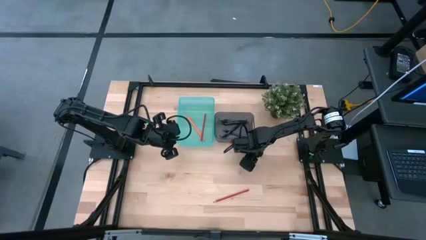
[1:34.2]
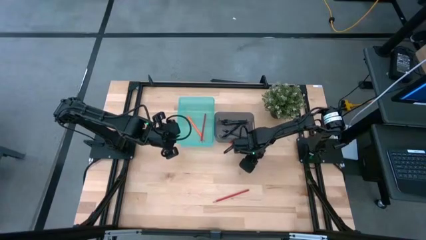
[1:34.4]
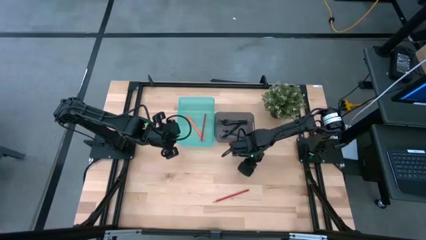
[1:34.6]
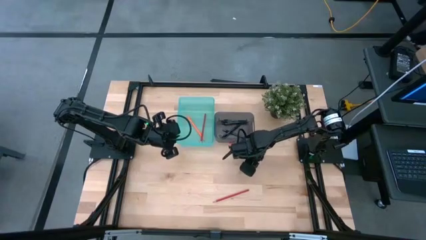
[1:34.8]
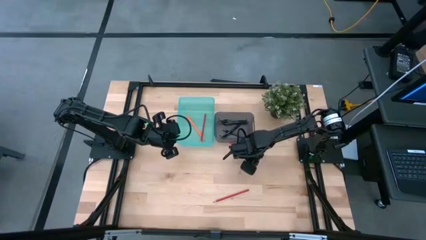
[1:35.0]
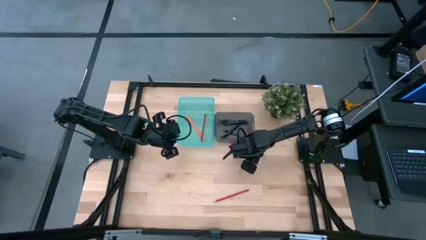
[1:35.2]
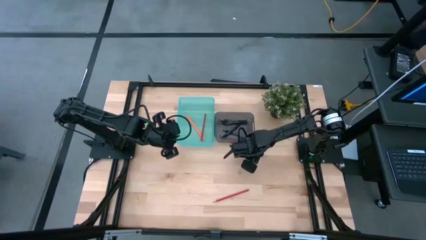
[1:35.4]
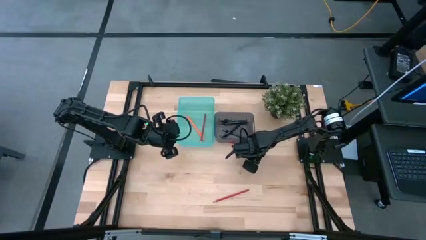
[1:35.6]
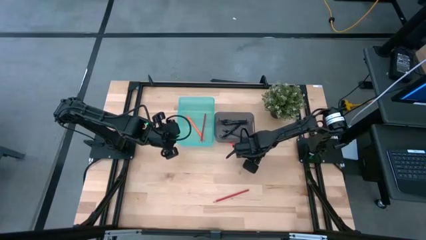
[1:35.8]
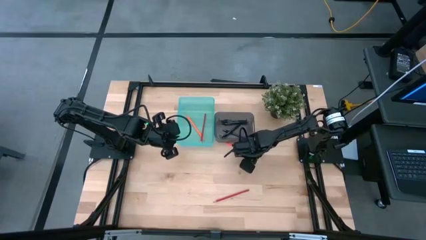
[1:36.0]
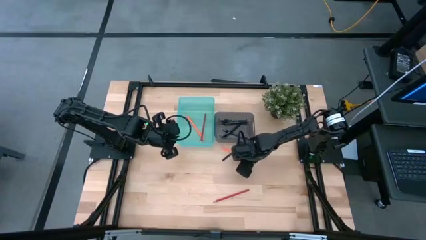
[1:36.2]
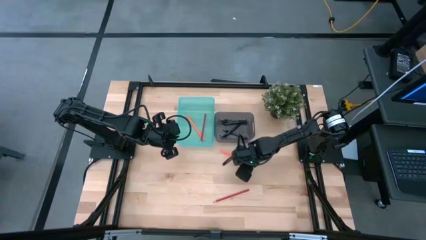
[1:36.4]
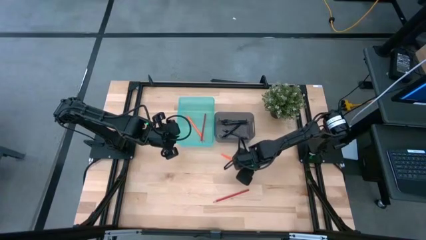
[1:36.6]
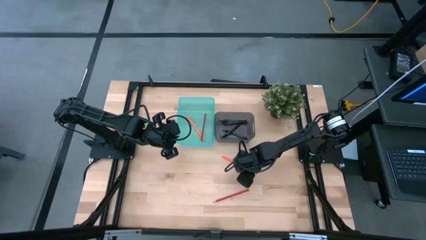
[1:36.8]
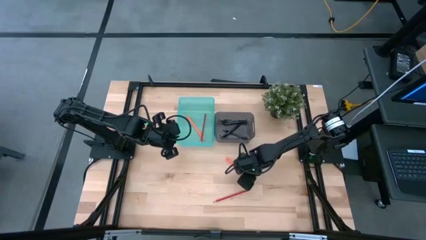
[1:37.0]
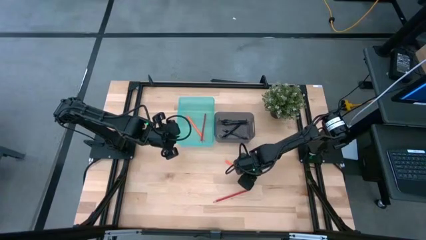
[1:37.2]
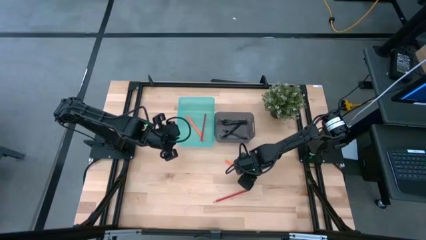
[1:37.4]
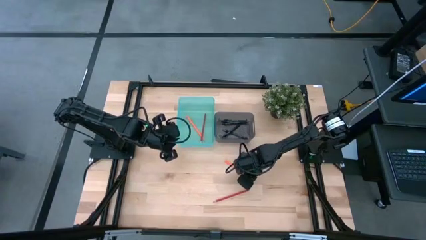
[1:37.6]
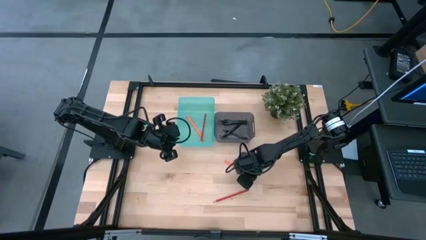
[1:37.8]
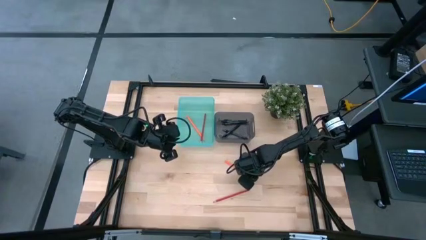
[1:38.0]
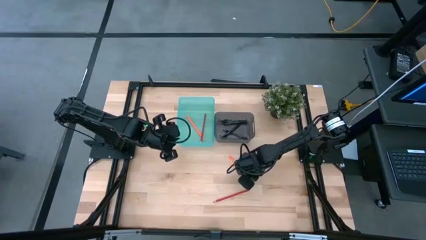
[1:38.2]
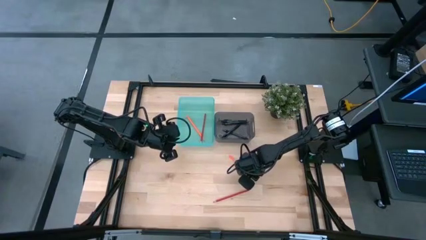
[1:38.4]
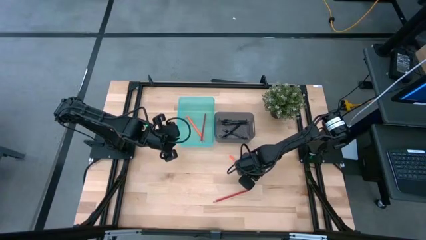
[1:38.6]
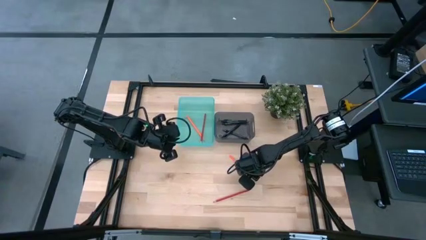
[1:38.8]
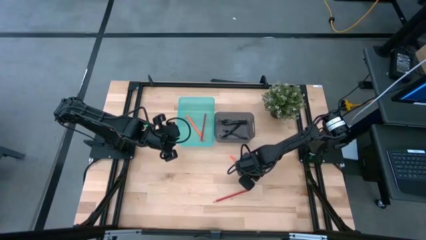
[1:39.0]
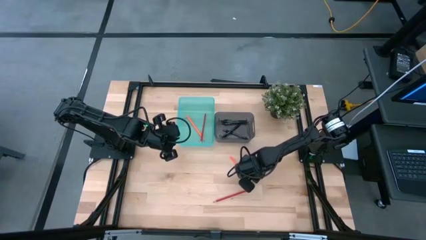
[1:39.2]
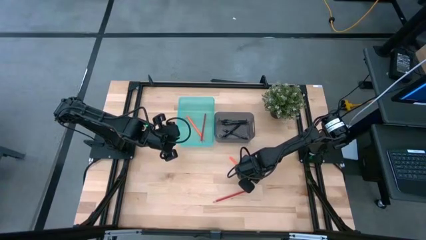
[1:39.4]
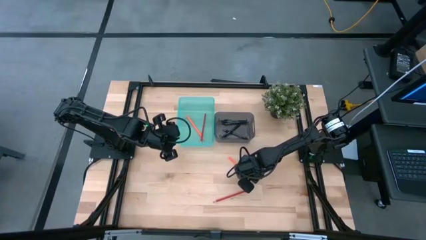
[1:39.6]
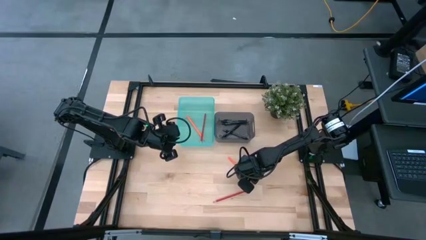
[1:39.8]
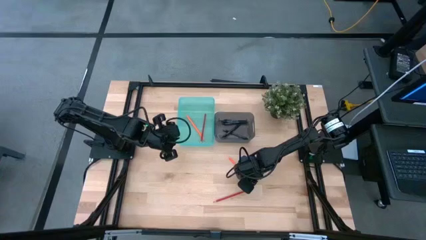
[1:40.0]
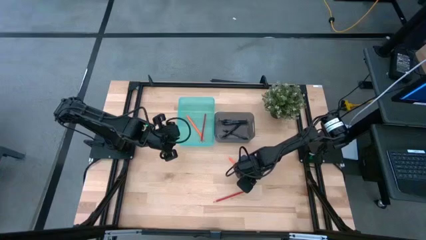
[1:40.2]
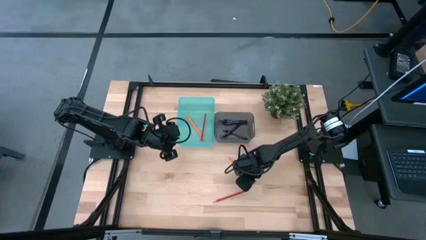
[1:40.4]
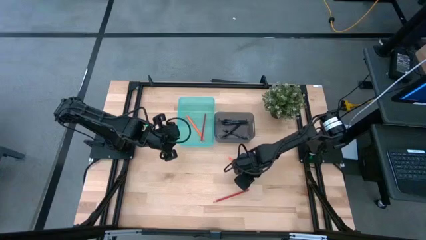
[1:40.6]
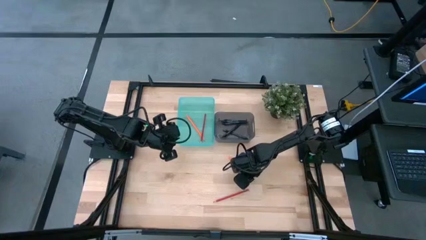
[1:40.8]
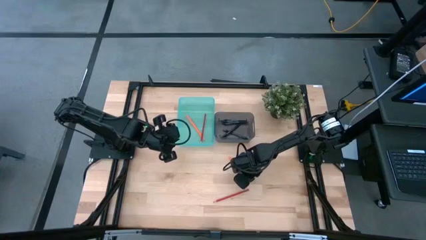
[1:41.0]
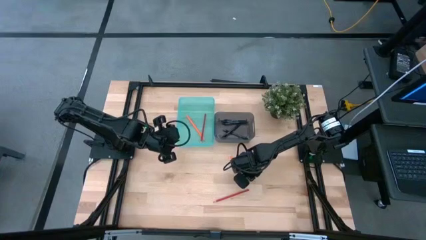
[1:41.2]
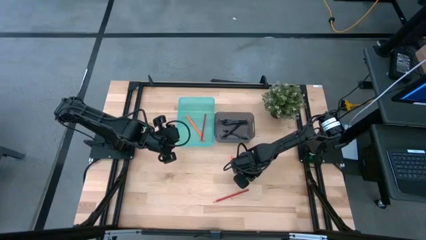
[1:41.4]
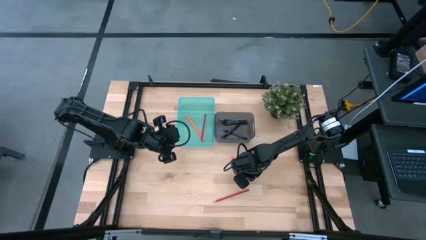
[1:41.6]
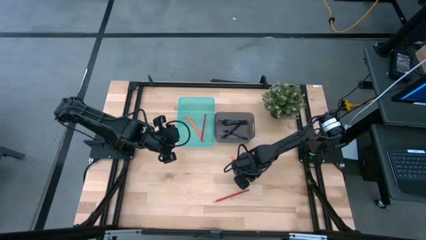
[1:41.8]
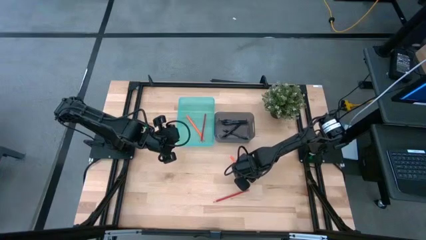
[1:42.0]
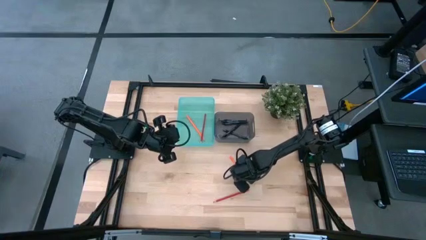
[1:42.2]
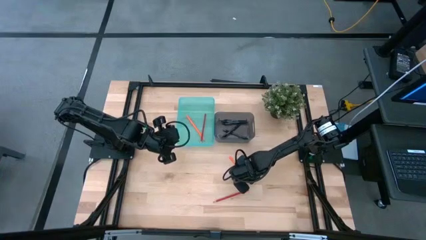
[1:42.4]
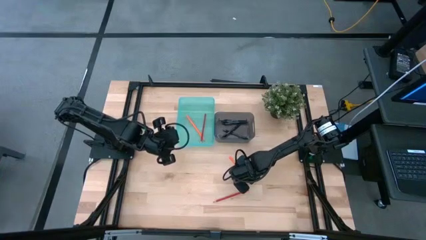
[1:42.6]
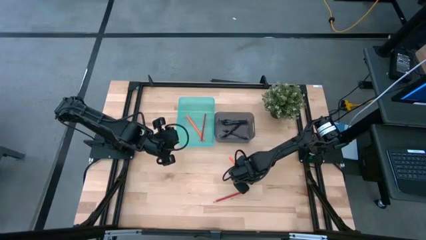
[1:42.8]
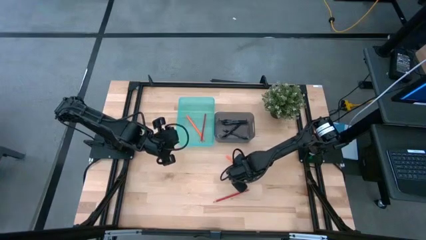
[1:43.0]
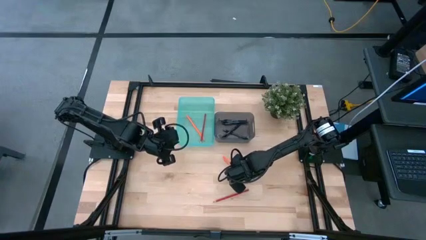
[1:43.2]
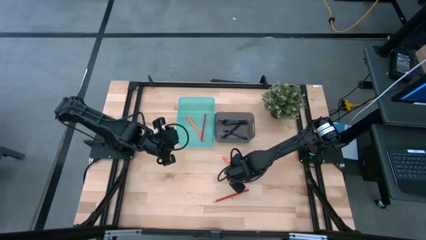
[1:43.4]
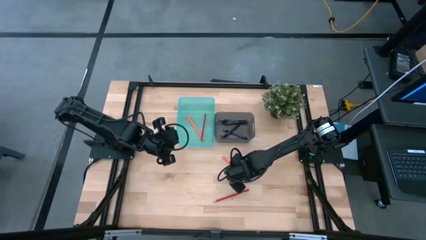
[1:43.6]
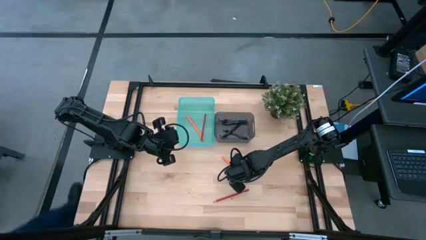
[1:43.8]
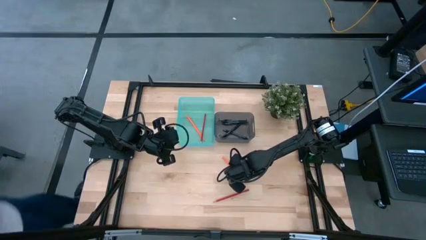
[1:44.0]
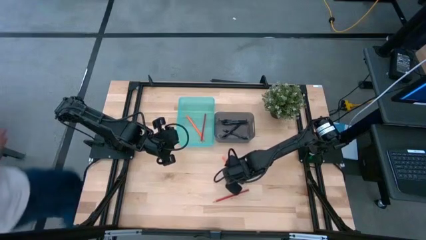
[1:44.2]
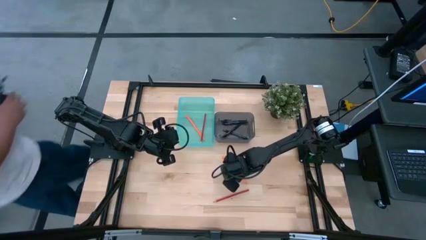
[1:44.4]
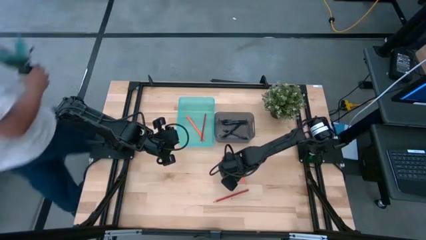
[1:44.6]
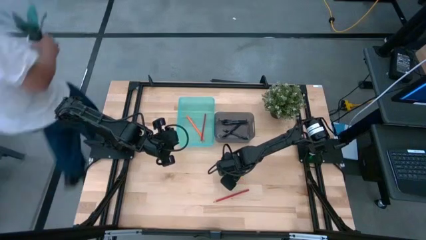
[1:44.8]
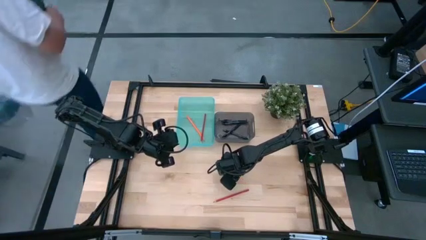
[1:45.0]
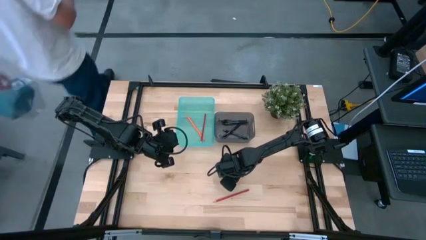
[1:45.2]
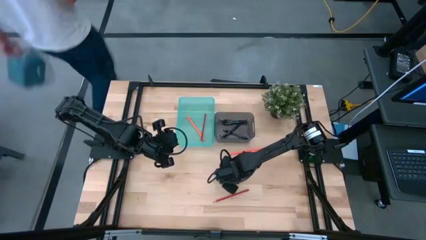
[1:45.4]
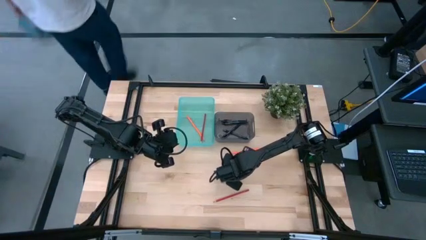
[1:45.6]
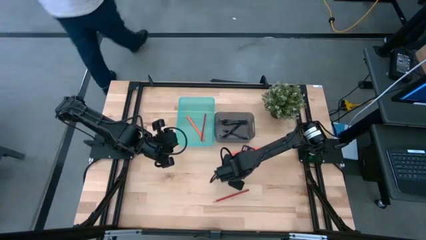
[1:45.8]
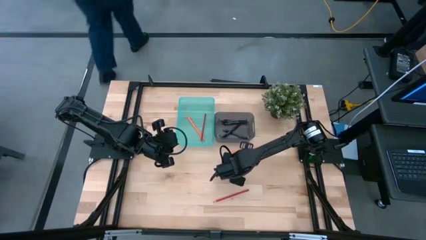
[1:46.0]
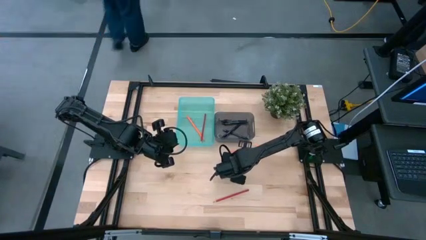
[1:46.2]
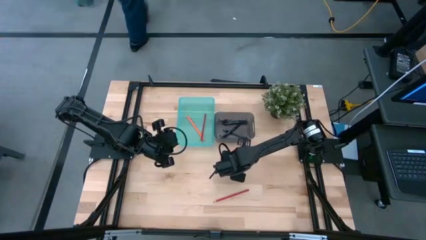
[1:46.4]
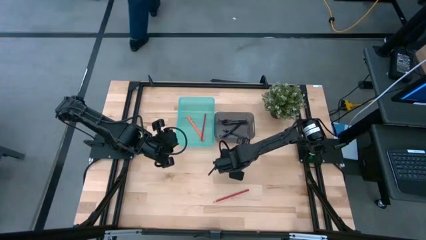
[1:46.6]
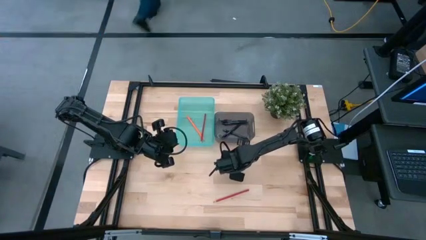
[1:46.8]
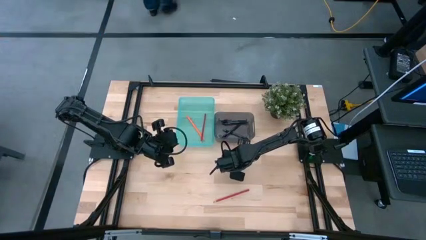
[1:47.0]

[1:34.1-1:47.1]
Task: Sort pens & pencils
Put the orange colored pencil into the green bin

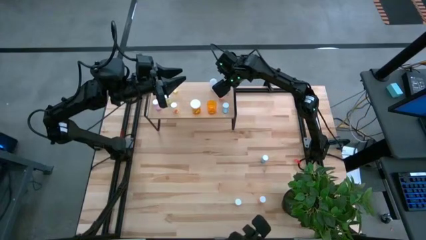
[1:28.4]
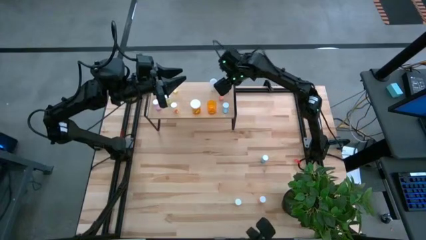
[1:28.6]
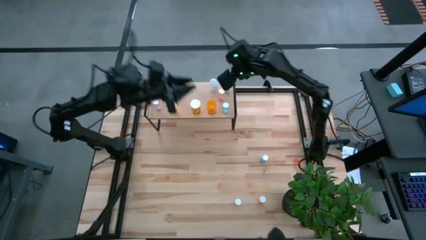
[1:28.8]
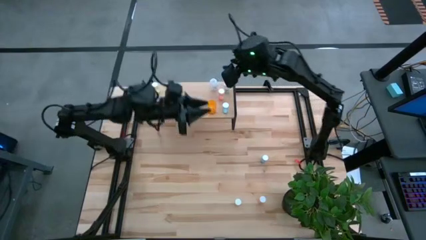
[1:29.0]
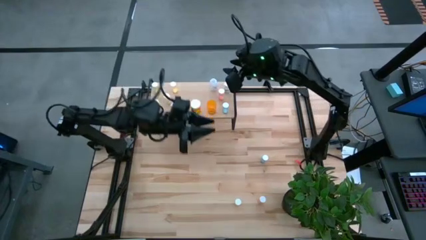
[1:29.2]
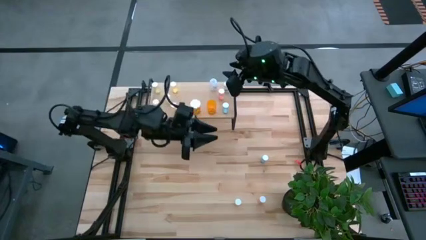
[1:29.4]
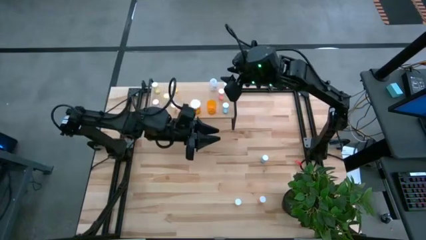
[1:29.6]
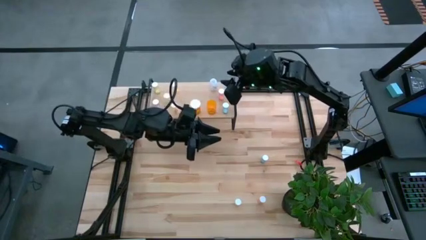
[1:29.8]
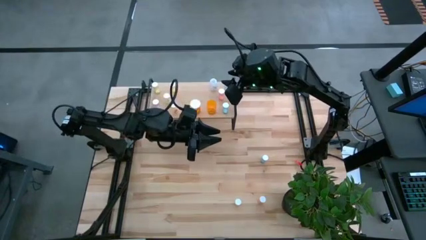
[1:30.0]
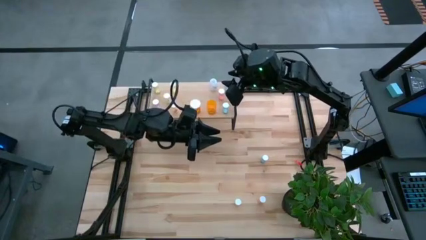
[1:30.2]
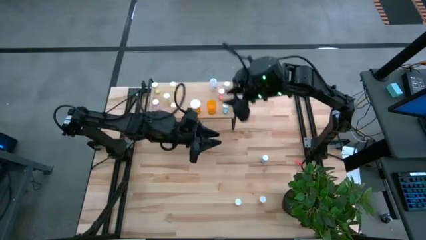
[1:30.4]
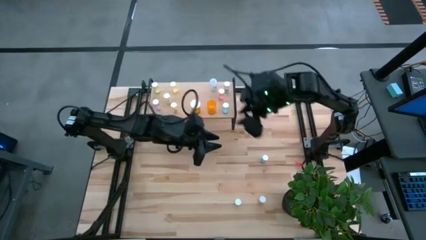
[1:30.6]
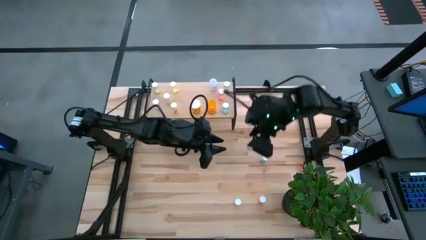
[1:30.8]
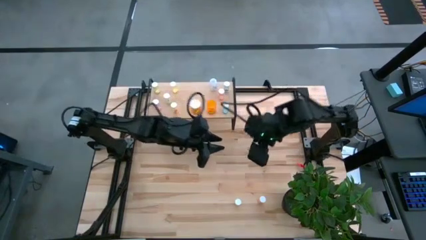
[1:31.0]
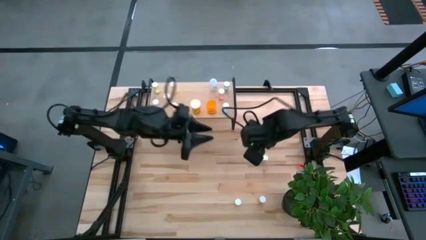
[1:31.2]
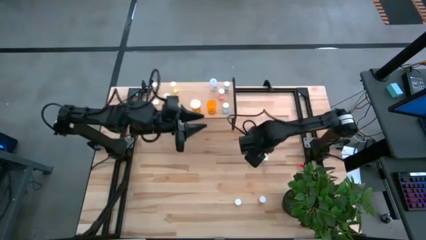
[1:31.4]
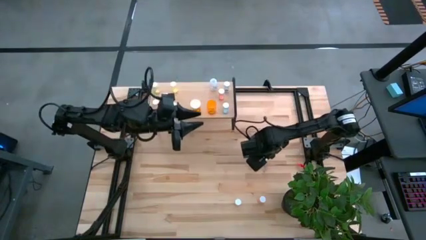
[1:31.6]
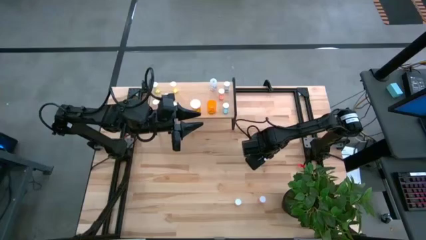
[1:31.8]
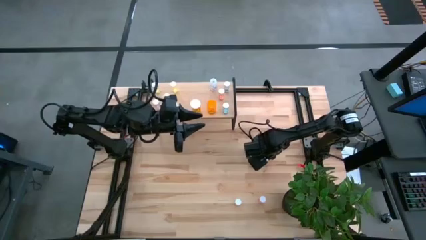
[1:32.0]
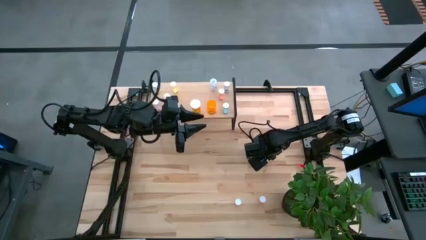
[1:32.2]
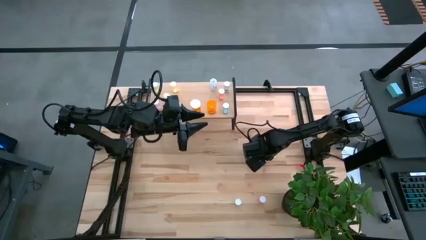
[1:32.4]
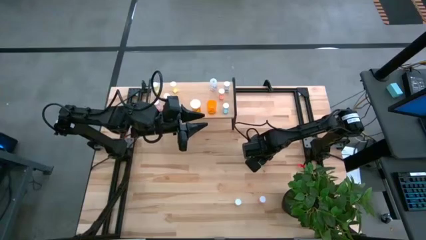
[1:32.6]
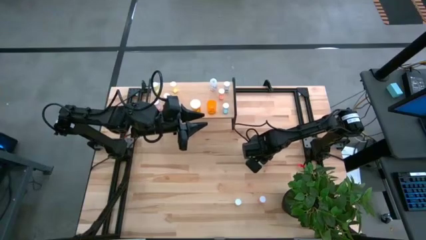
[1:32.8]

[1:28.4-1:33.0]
Task: Pick and place medicine bottles onto shelf by color
Put the blue pill bottle on the shelf
